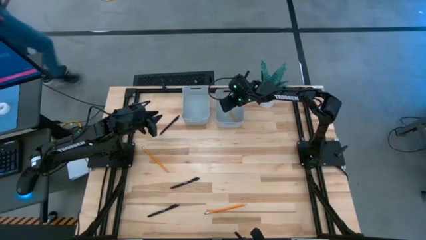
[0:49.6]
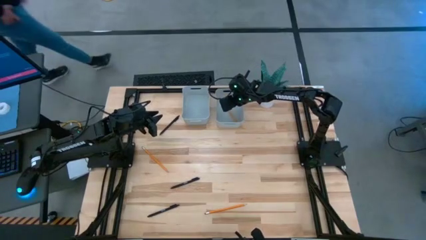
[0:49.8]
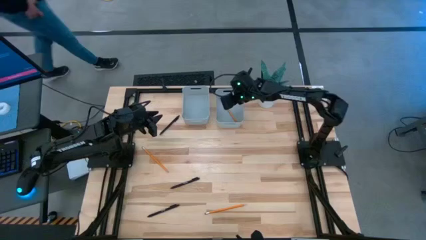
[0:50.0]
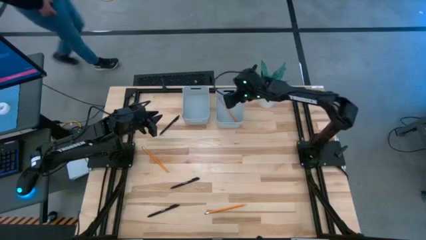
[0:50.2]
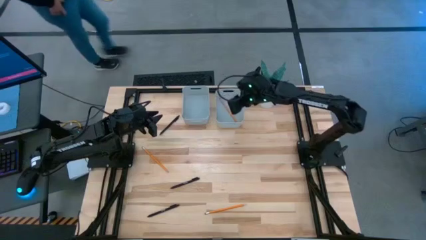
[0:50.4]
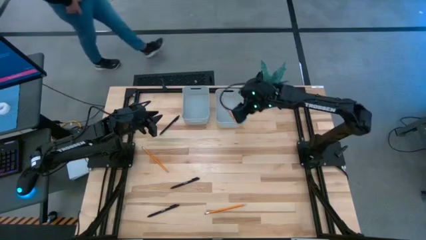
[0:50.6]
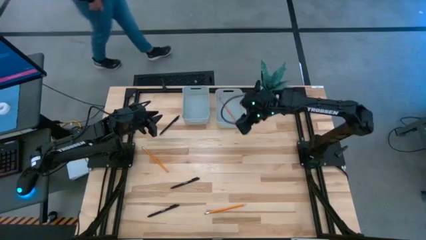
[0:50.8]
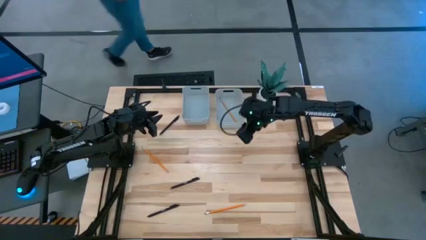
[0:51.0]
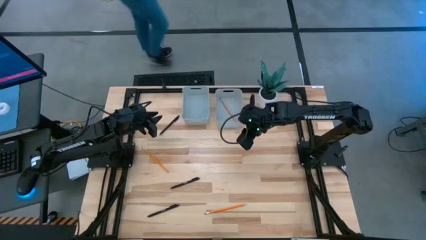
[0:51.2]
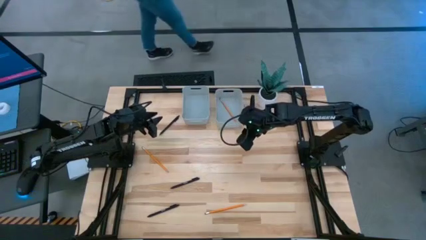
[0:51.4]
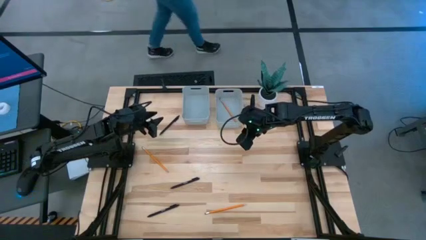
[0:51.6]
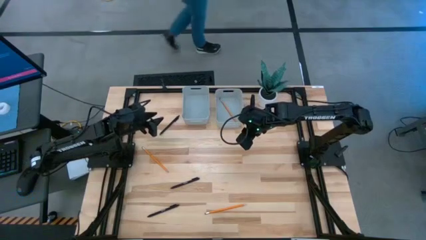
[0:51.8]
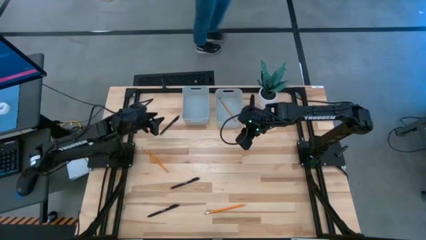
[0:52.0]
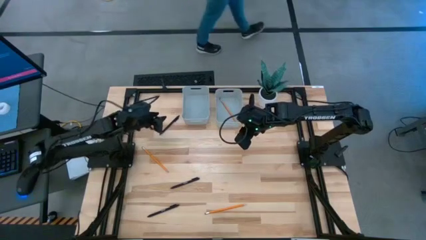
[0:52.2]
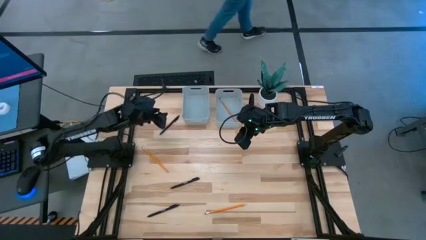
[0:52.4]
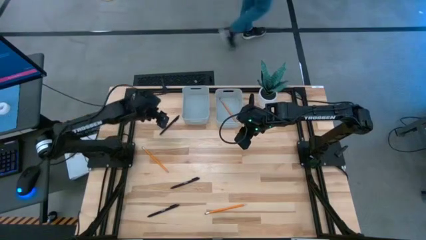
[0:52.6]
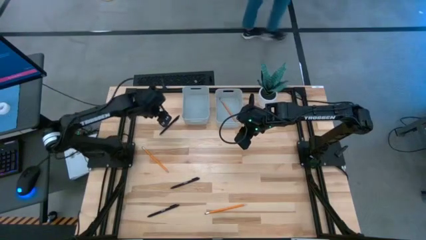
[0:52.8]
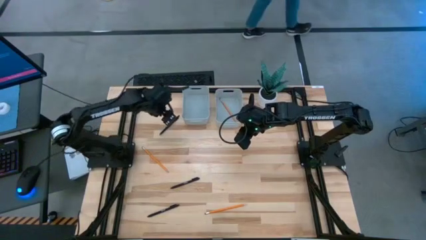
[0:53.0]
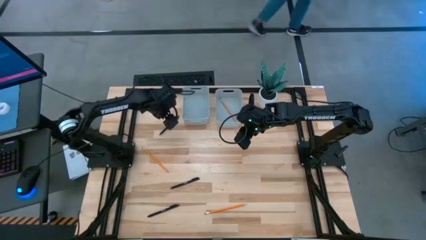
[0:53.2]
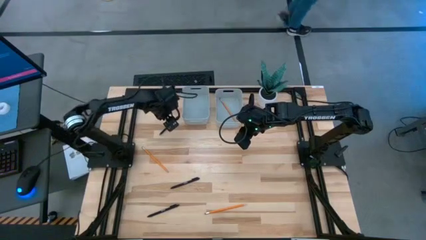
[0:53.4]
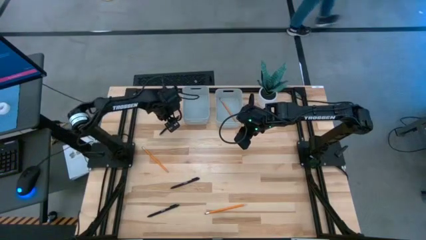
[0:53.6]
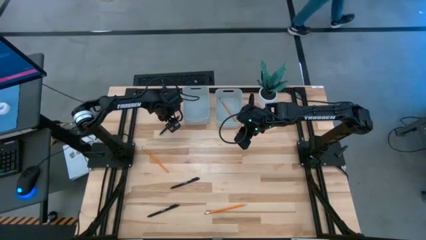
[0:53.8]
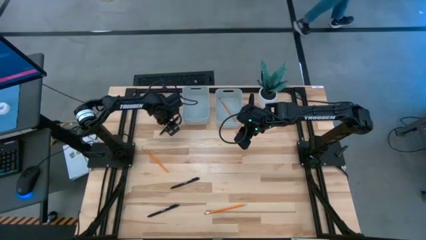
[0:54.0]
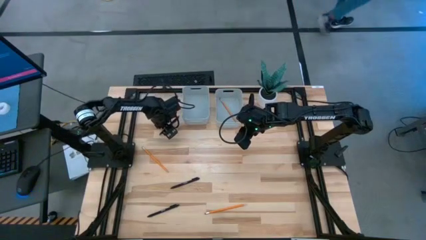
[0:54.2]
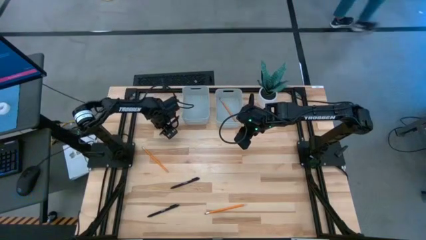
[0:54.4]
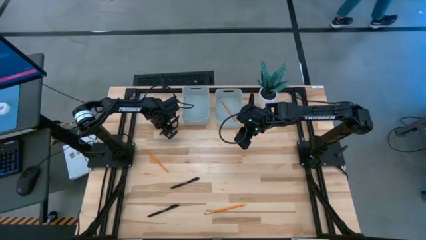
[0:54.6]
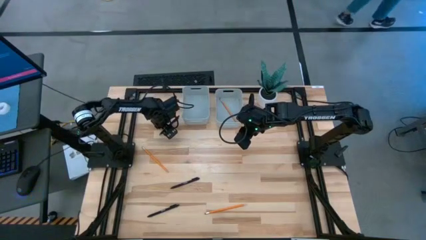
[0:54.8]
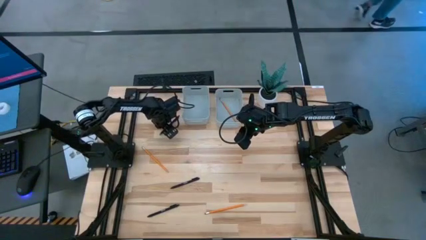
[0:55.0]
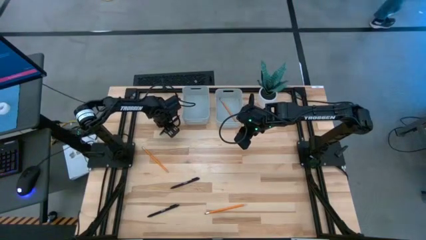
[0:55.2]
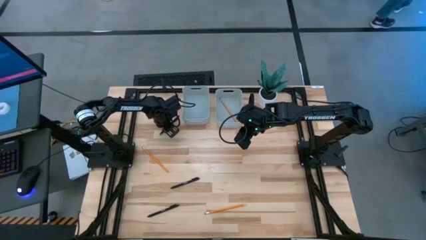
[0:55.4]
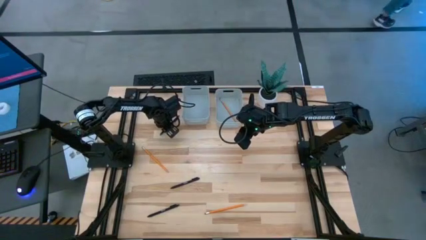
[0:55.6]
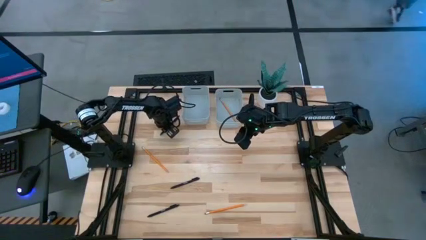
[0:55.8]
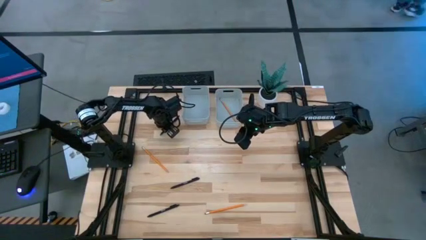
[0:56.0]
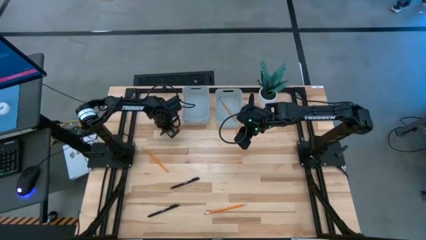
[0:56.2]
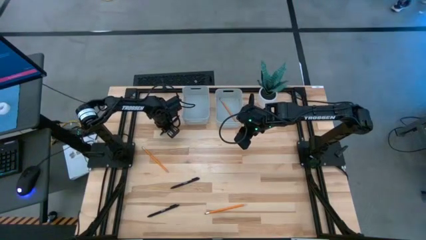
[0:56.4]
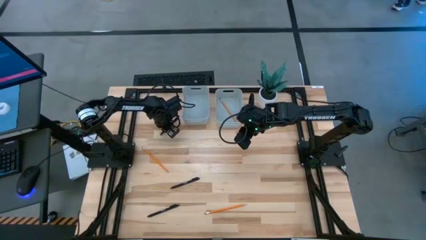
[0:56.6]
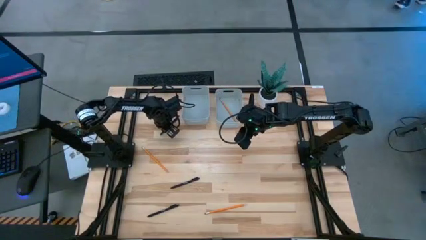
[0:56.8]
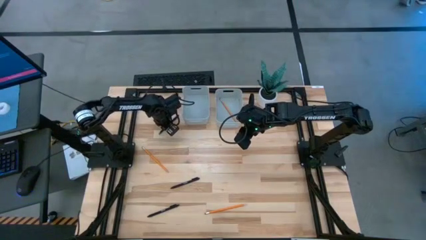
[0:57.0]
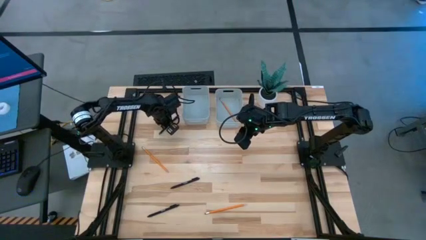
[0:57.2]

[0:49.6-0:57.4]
Task: Sort pens & pencils
Put the top black pen into the left gray bin

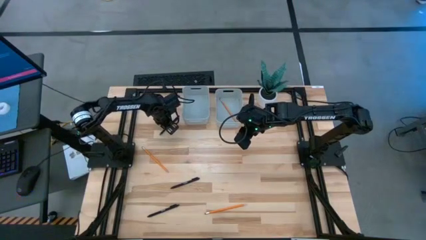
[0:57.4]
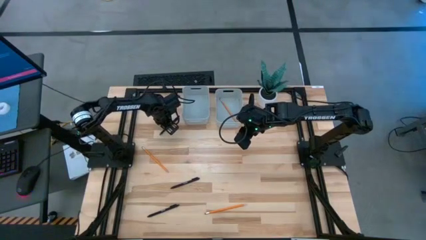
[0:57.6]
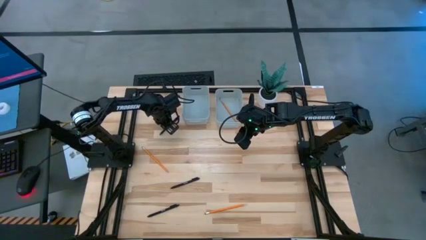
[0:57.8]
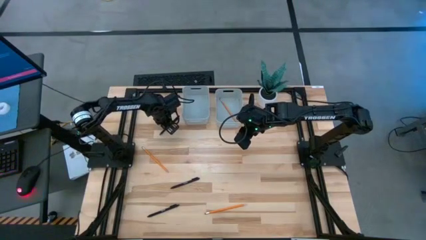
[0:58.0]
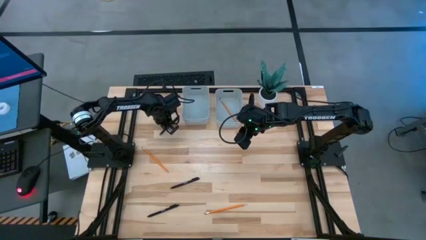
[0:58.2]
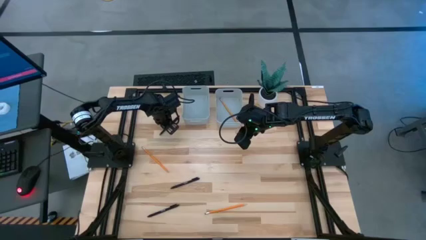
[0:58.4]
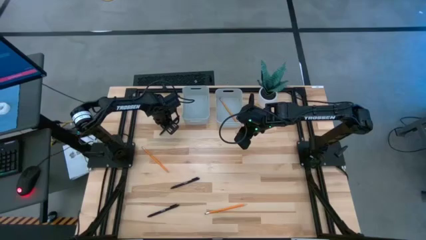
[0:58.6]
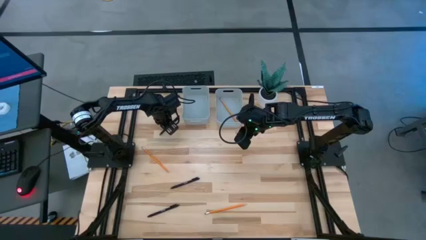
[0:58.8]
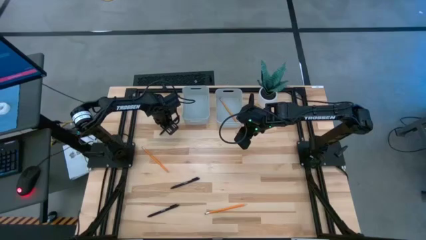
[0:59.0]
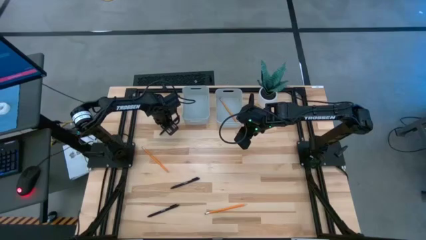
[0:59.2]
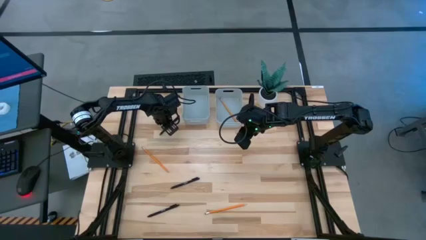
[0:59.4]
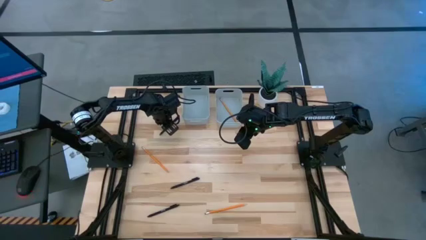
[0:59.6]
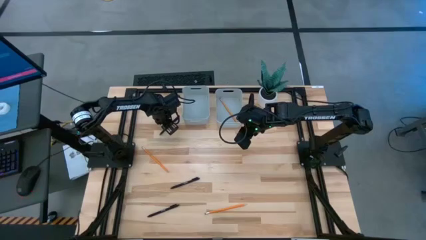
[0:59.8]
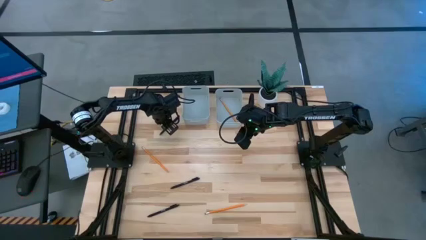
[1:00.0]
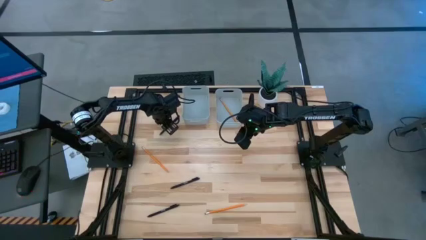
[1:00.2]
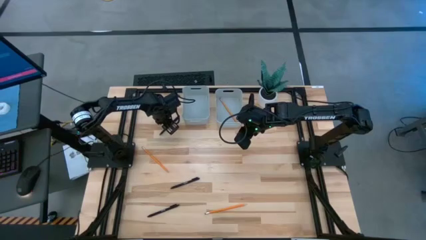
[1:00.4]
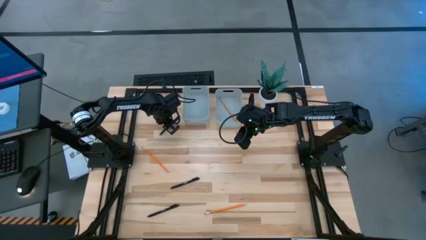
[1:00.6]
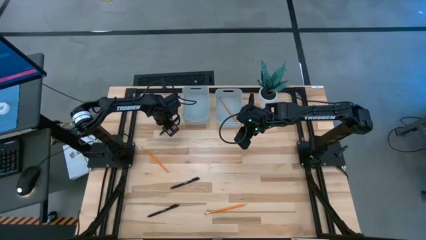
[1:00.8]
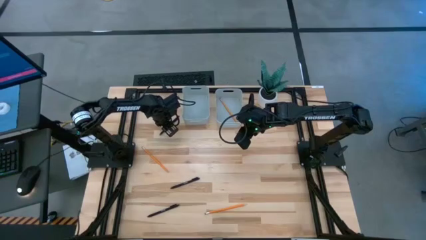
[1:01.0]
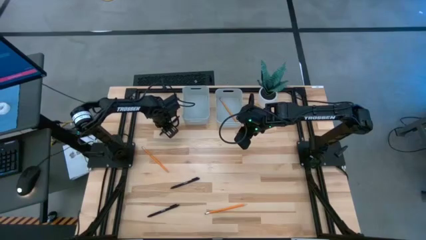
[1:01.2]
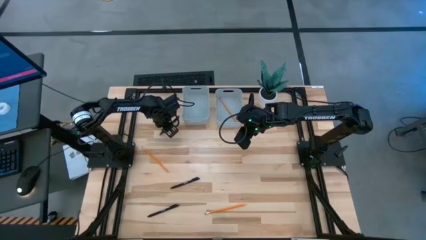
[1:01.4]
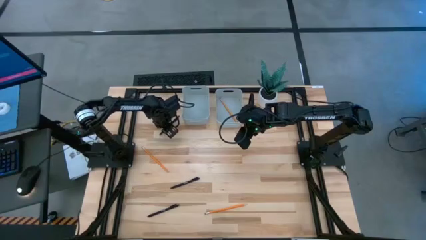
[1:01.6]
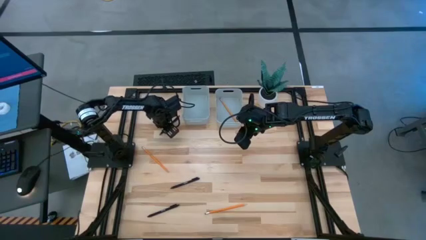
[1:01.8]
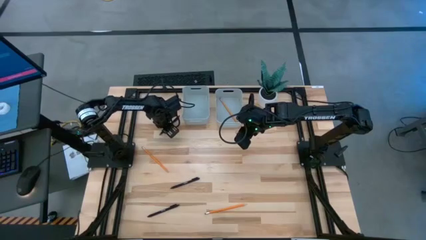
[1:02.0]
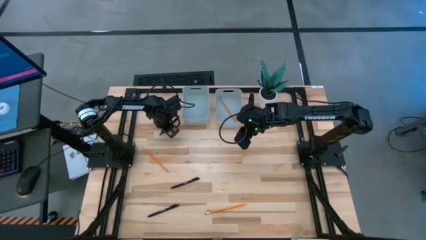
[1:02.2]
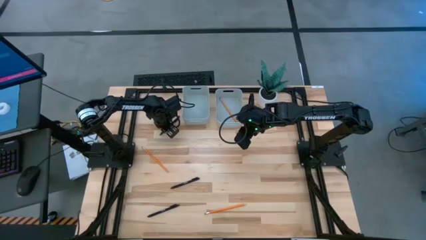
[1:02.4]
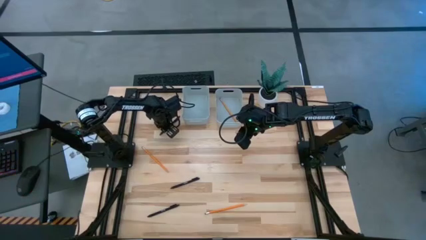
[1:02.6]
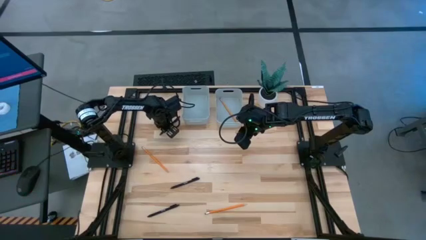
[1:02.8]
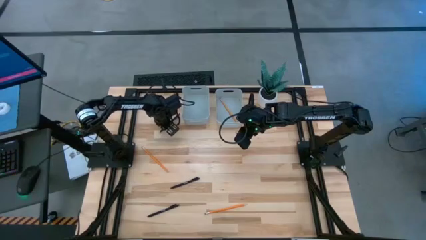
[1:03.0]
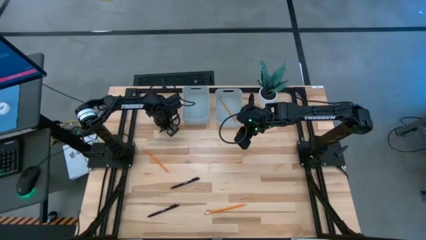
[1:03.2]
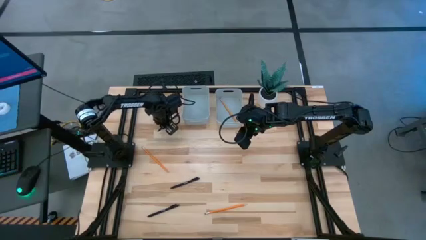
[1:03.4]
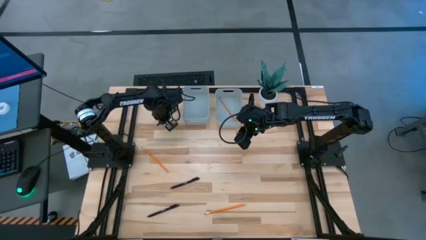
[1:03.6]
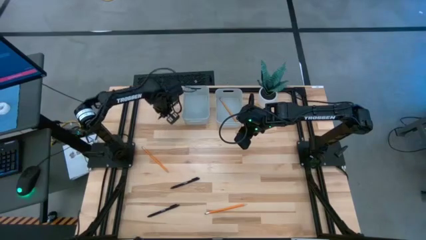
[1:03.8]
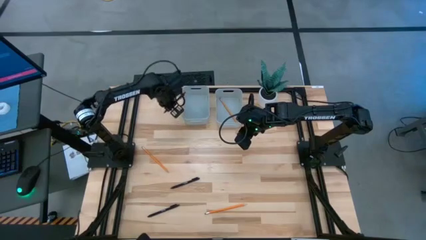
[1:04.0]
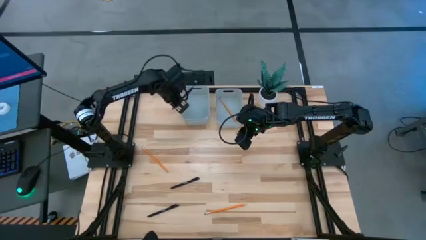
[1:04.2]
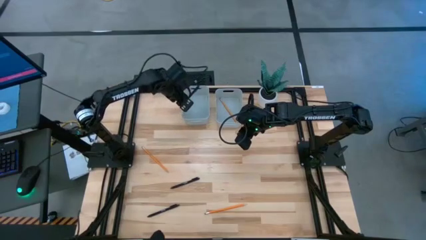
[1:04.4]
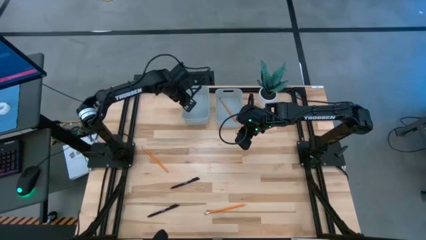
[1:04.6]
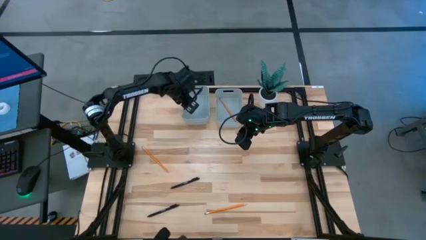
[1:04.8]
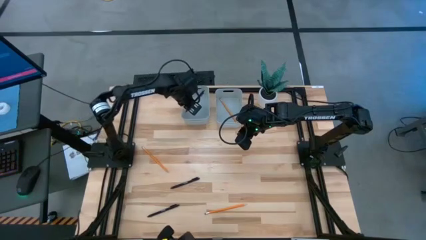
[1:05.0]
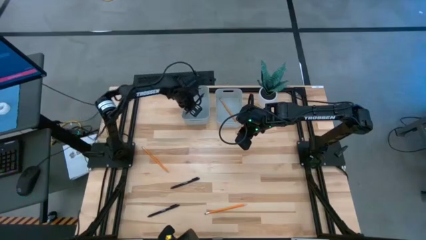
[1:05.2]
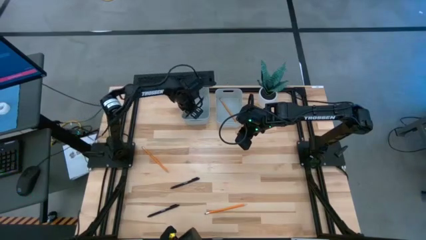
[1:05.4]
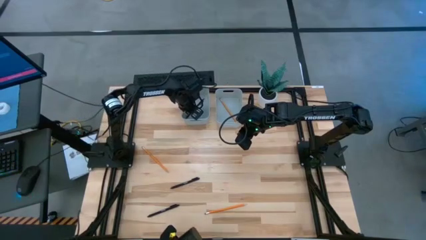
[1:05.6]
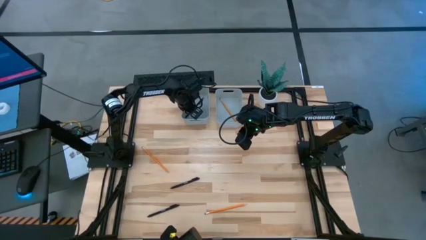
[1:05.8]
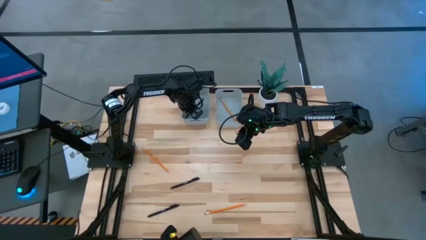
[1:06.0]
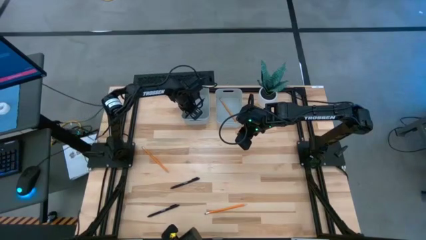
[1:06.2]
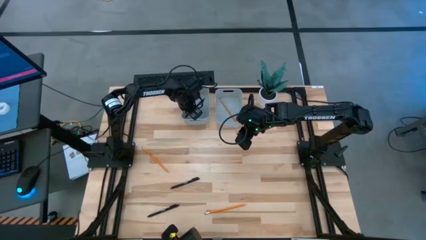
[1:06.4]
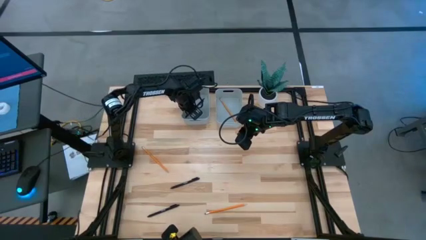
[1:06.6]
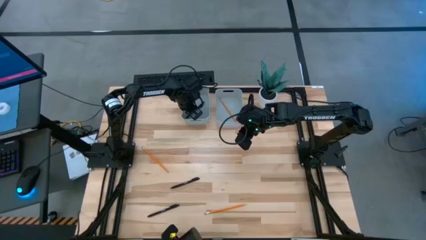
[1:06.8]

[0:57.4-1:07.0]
Put the top black pen into the left gray bin
